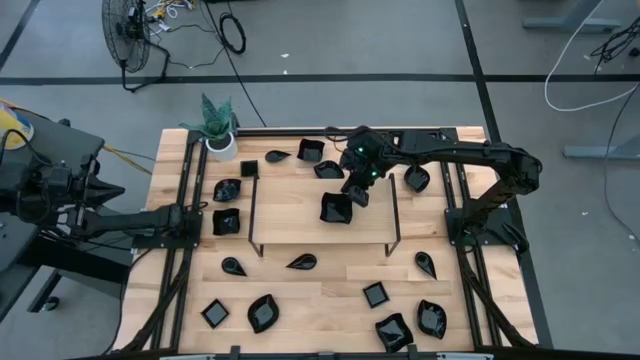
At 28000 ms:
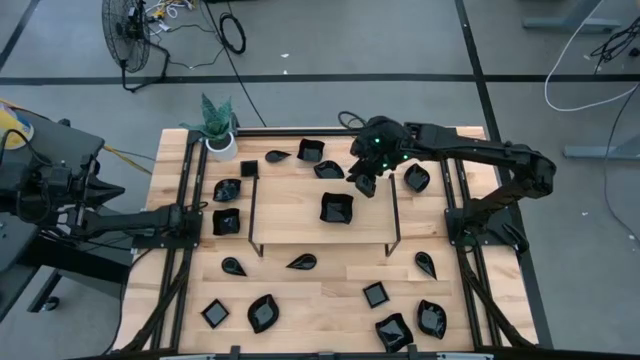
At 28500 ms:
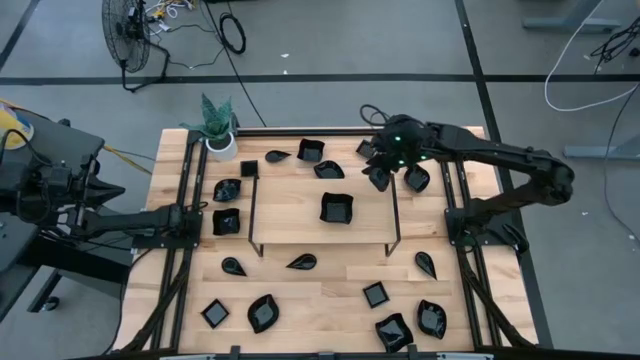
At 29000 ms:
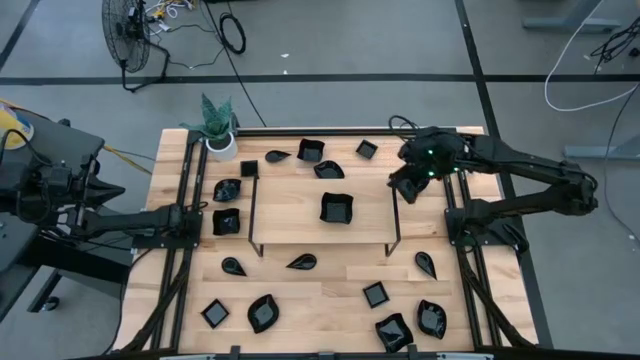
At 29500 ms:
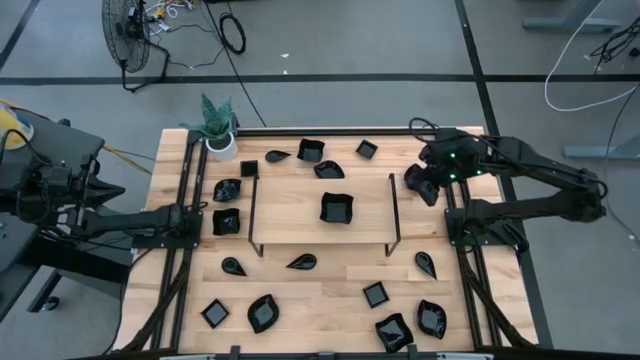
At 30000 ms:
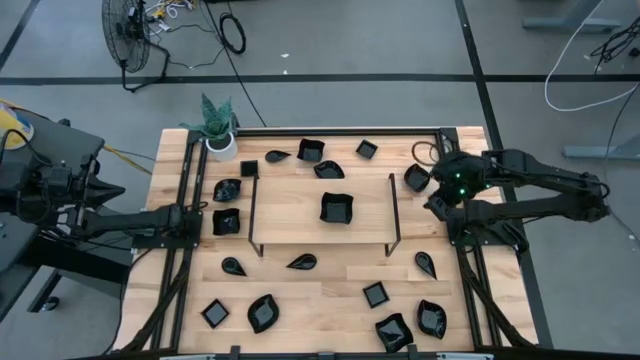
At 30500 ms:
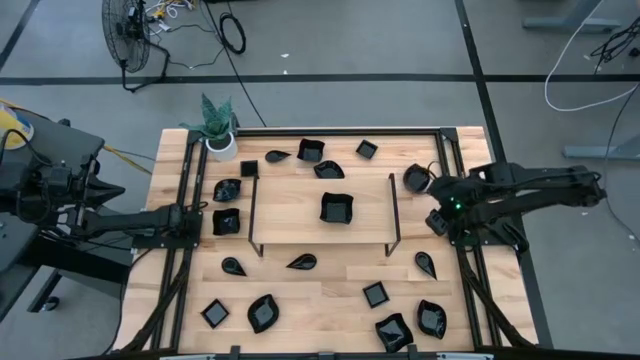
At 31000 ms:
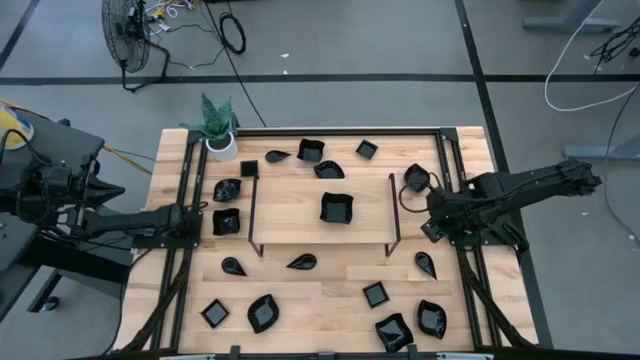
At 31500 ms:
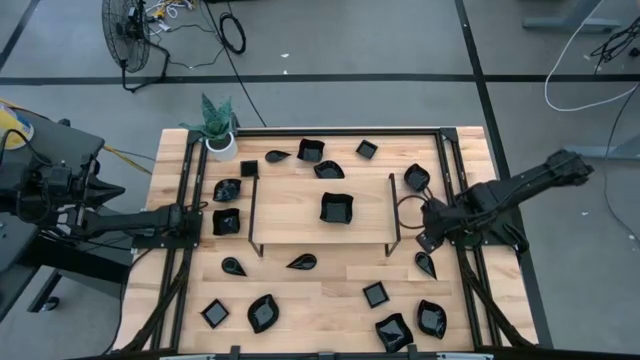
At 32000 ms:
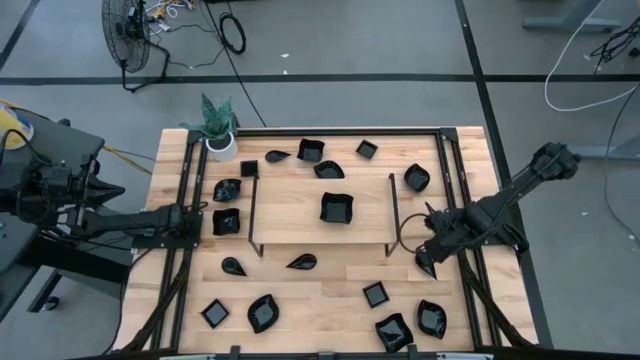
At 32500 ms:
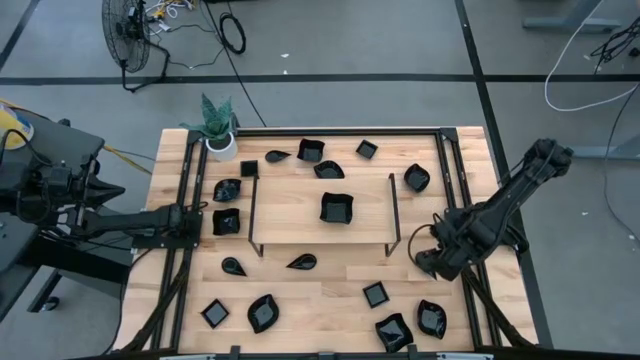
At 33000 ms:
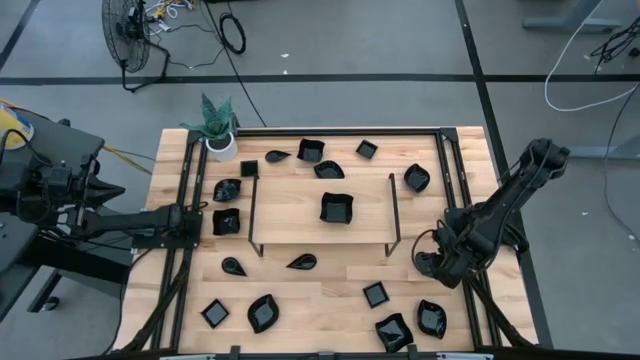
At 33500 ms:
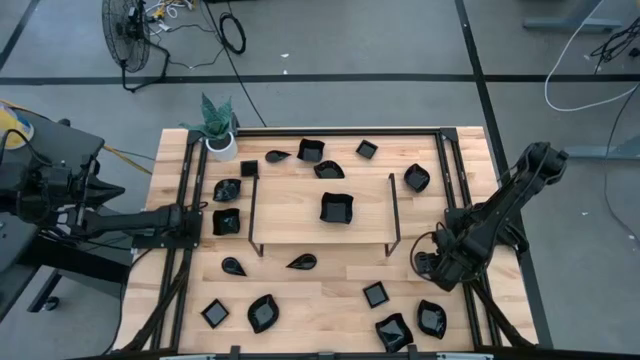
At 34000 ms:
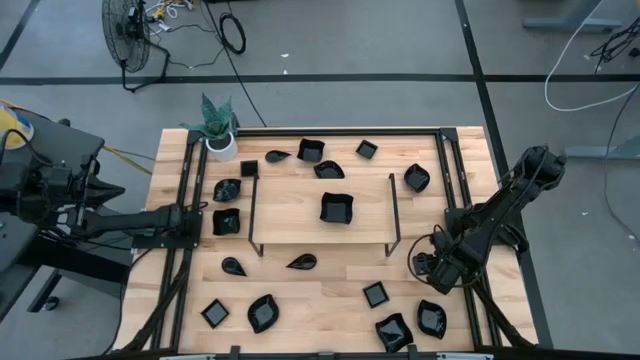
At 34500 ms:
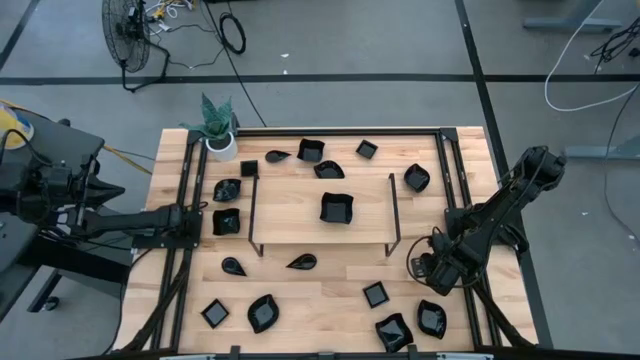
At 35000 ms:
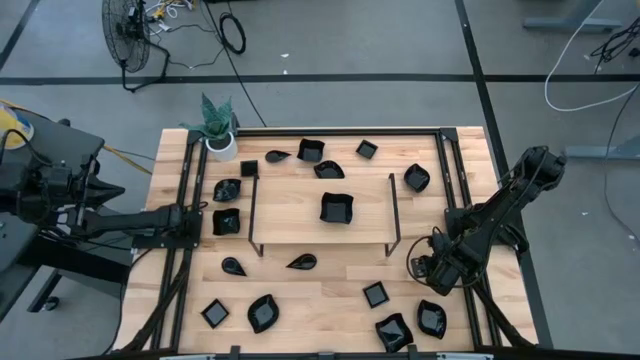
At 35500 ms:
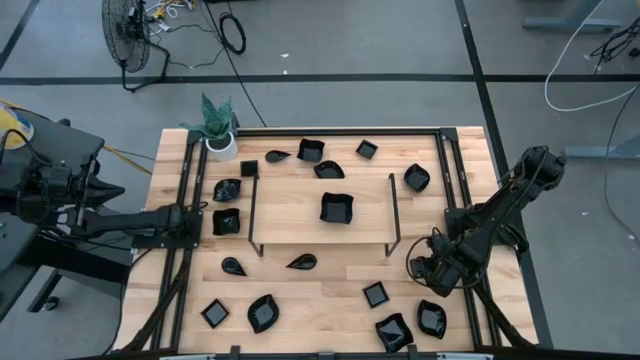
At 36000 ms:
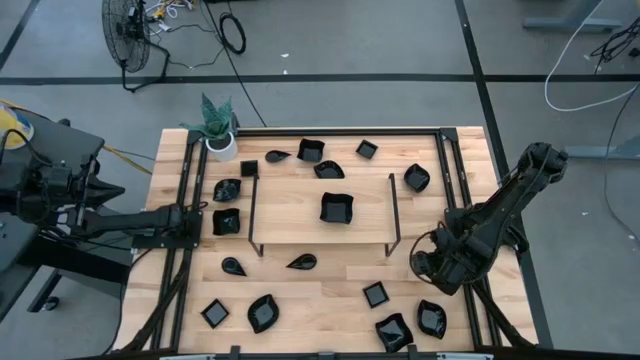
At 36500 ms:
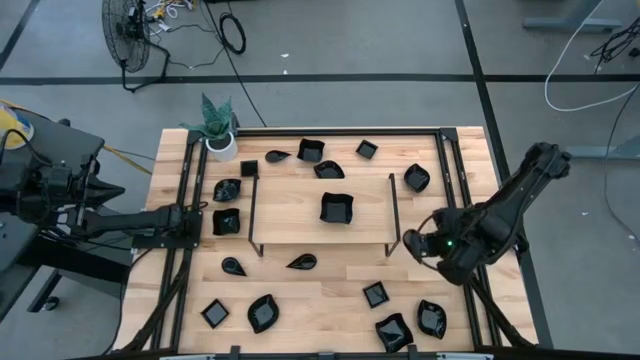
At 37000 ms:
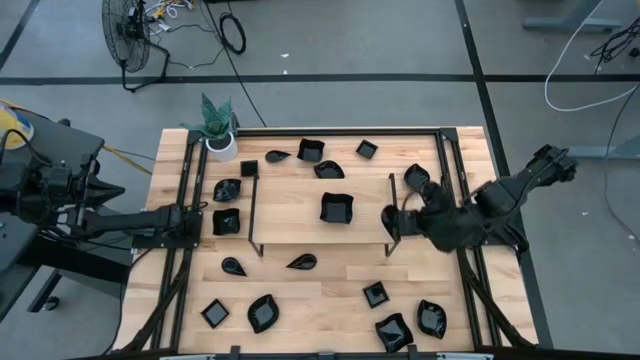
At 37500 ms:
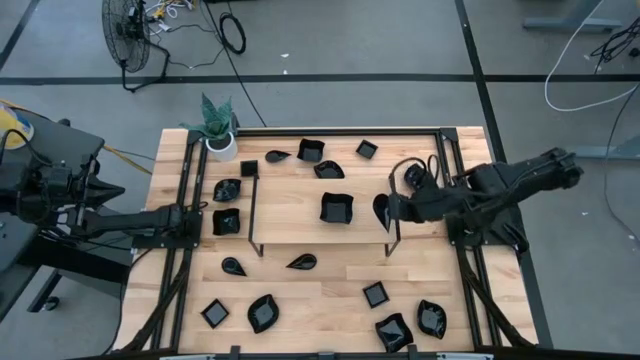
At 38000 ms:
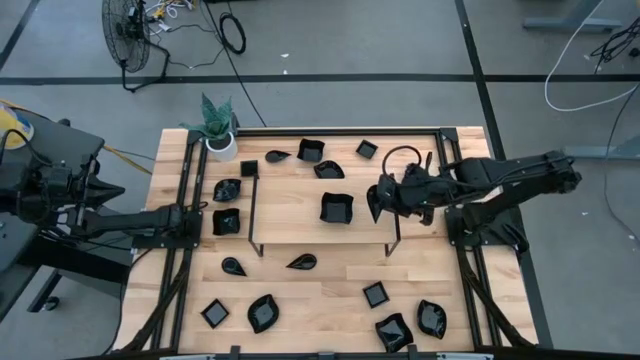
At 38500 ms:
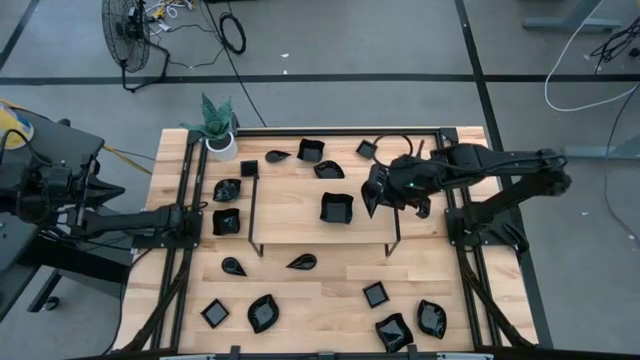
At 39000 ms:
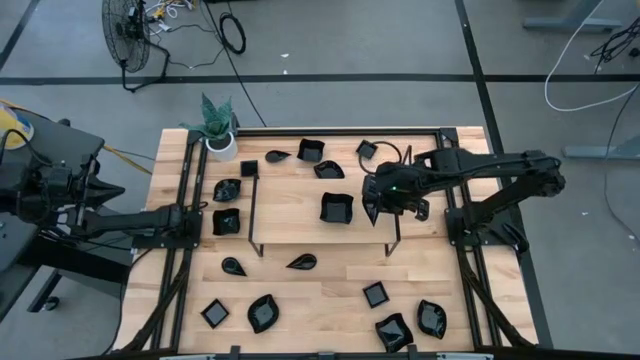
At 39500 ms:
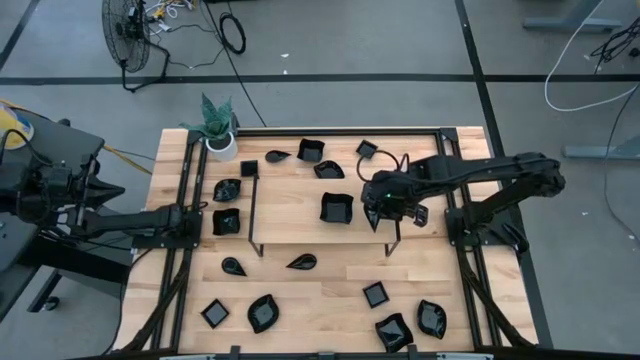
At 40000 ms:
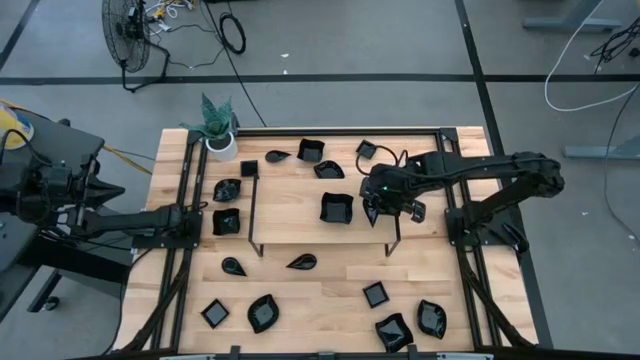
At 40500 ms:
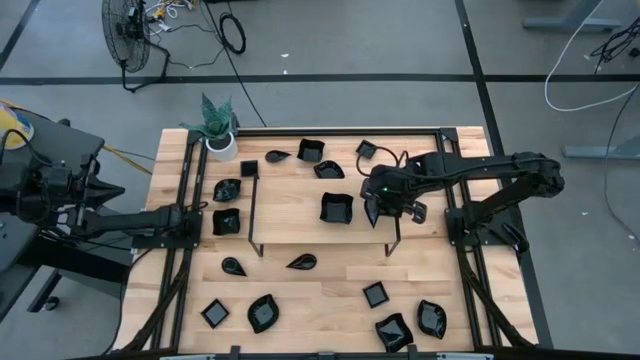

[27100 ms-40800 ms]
Task: Pick & Place Mini shaped plates
Put the drop shaped plate on the shelf

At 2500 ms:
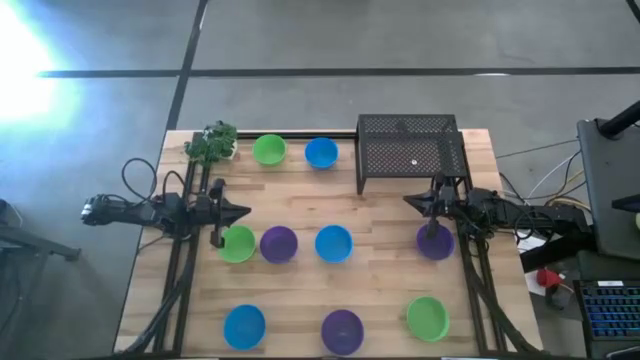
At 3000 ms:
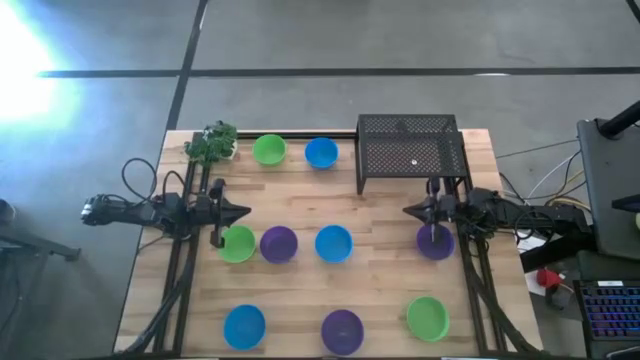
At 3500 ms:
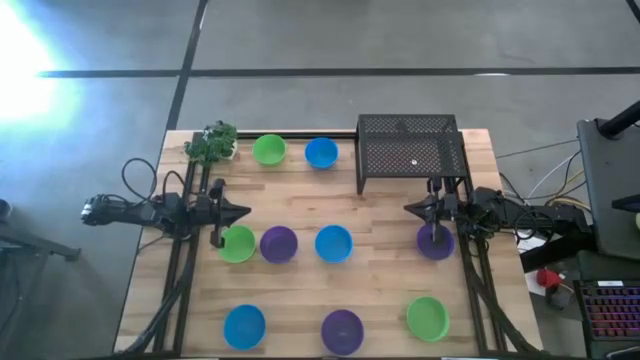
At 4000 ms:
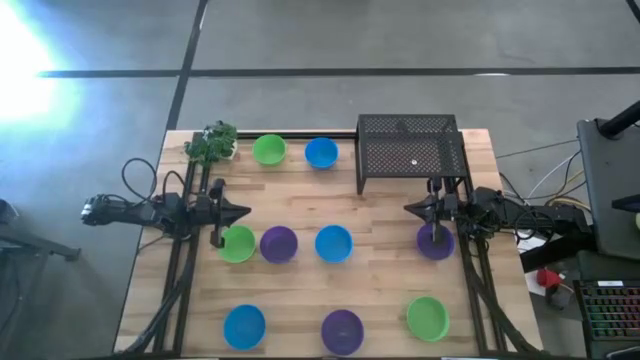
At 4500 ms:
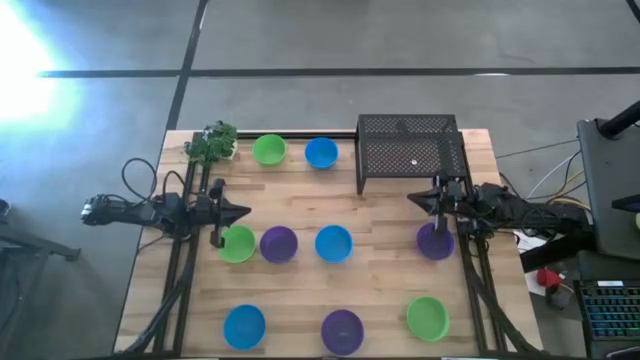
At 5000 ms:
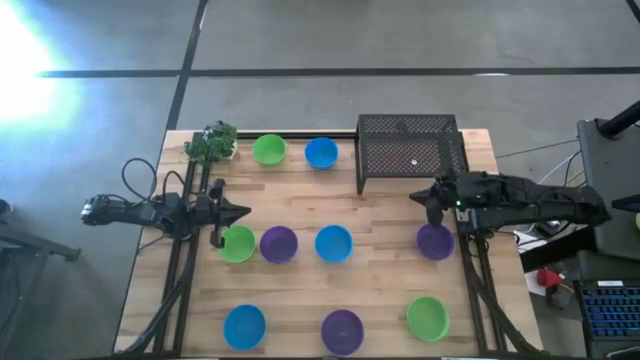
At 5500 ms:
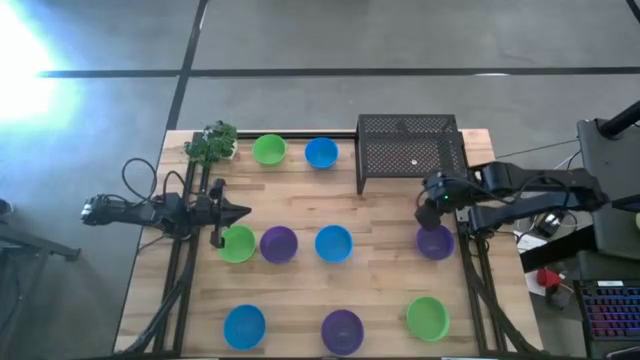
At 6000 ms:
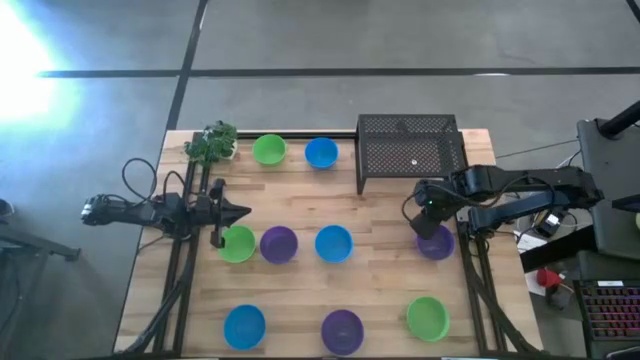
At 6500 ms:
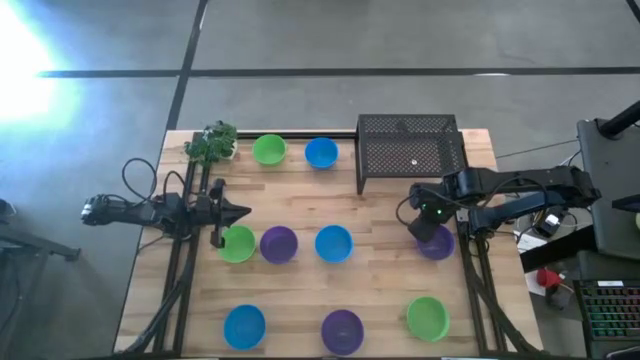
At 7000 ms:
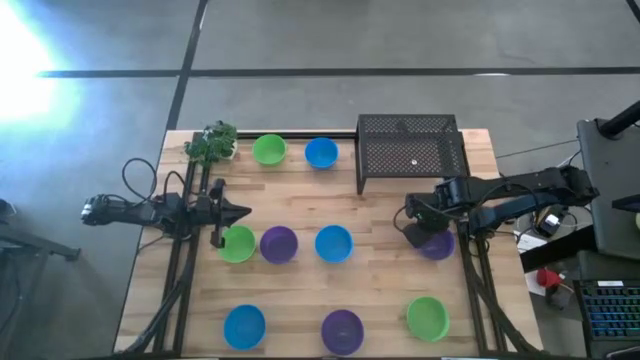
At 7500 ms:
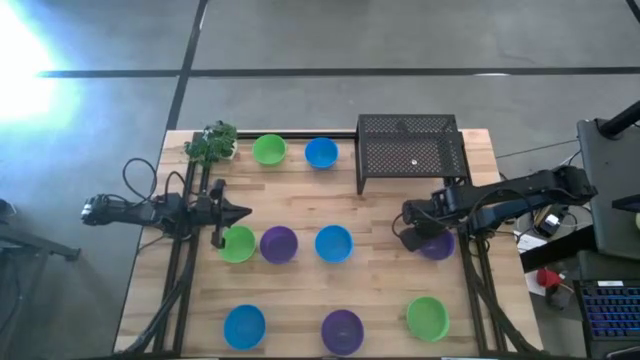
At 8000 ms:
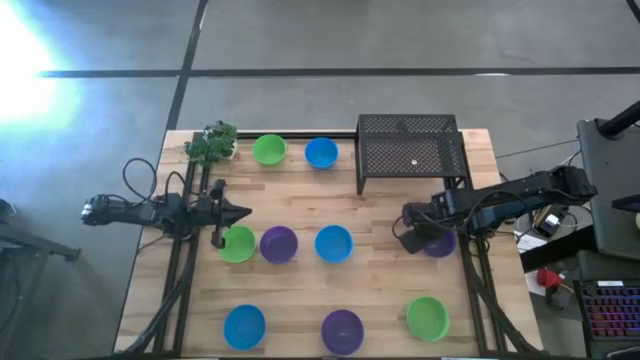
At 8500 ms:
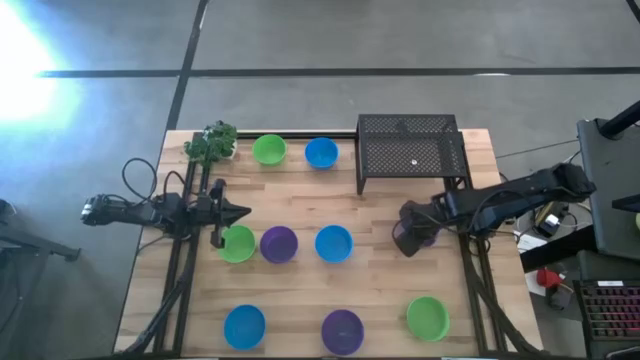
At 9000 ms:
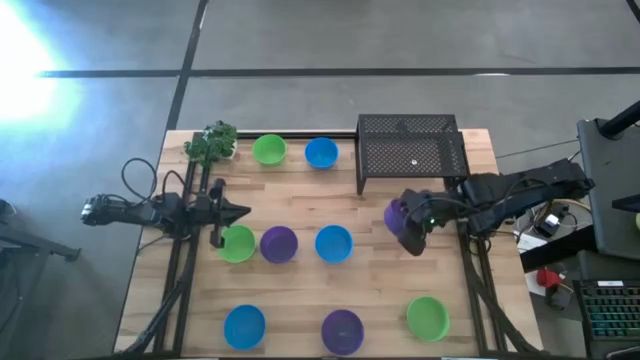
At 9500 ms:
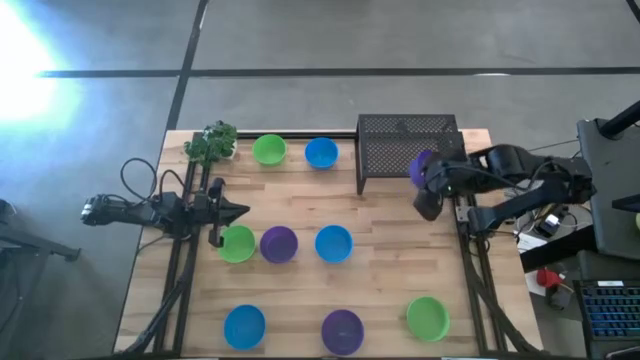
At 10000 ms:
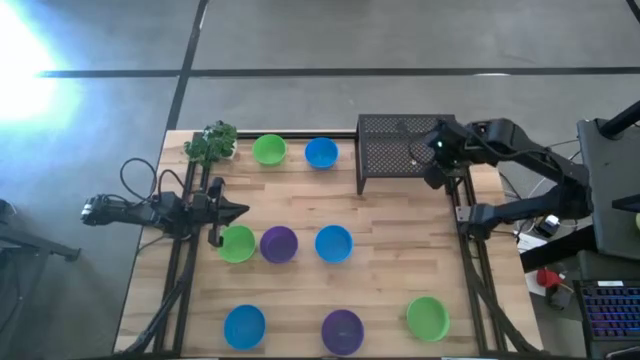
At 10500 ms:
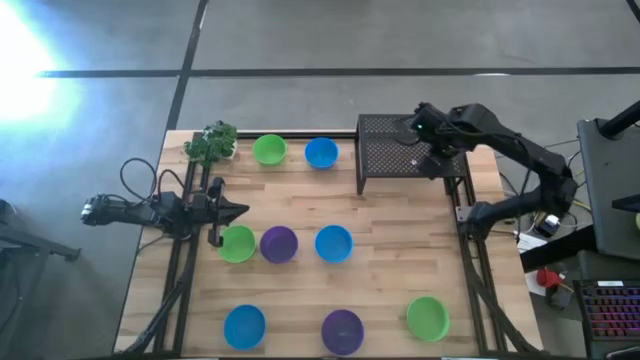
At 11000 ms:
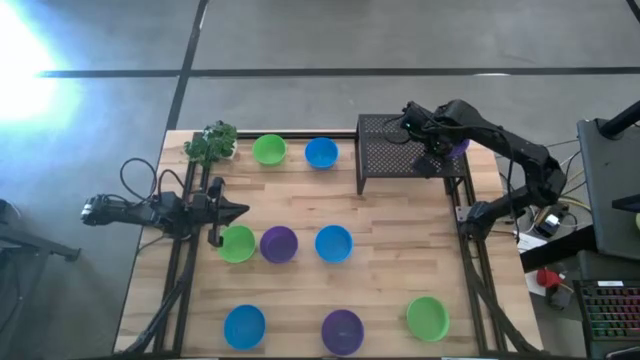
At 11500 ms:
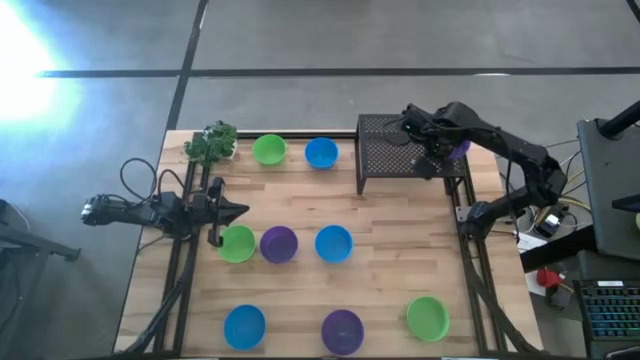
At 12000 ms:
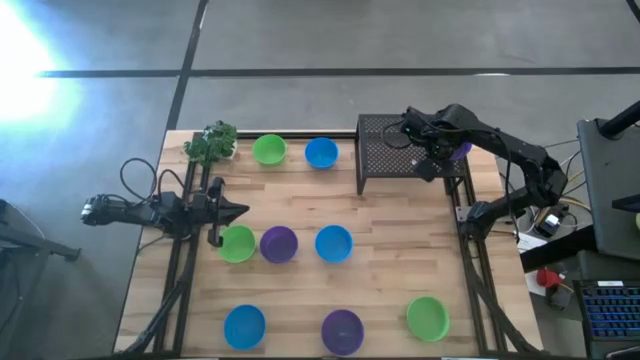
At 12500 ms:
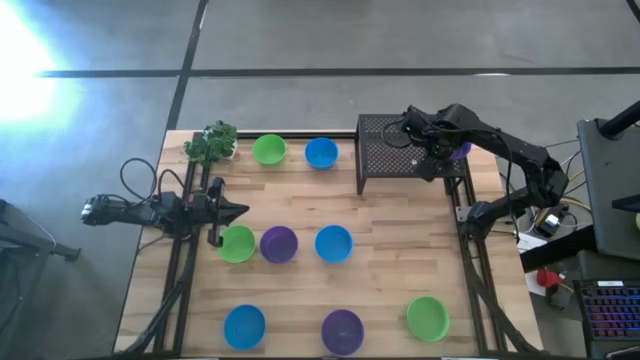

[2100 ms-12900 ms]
Task: Pick & Place Mini bowls
Put the top right violet bowl on the shelf
